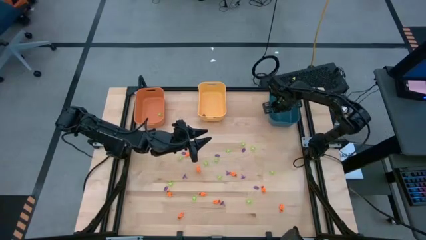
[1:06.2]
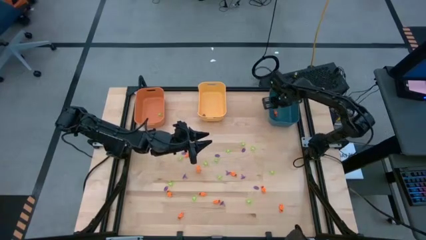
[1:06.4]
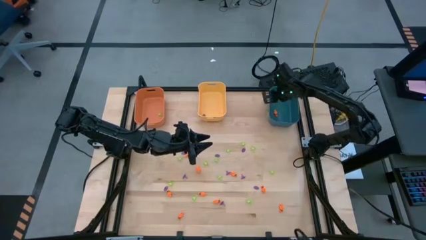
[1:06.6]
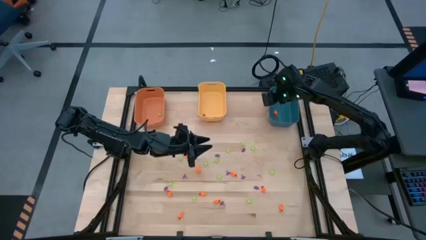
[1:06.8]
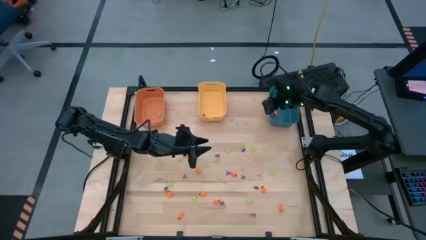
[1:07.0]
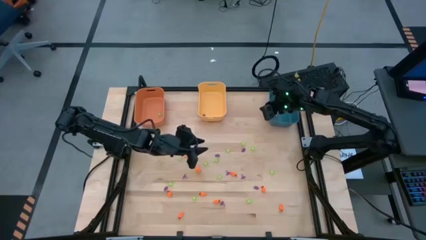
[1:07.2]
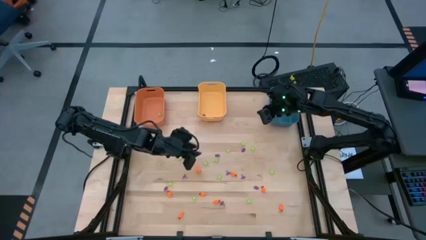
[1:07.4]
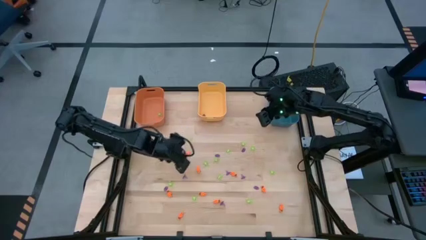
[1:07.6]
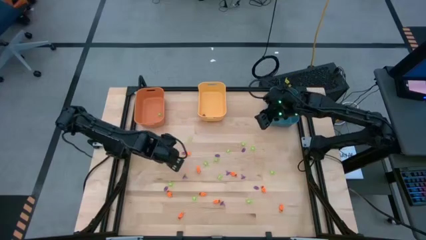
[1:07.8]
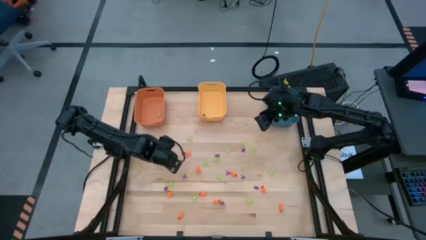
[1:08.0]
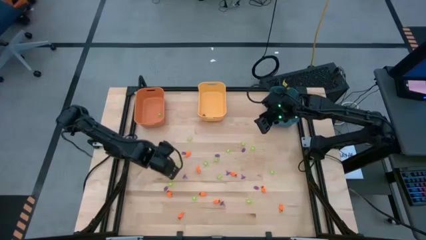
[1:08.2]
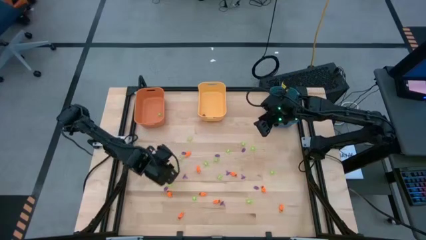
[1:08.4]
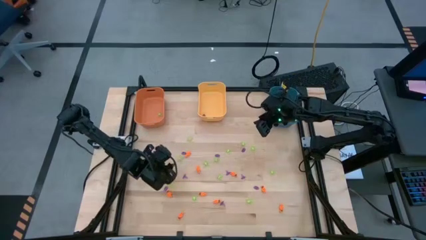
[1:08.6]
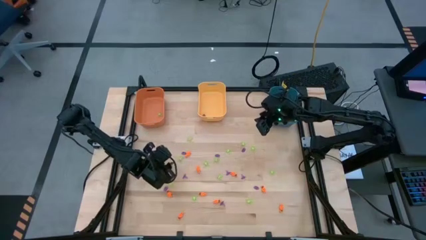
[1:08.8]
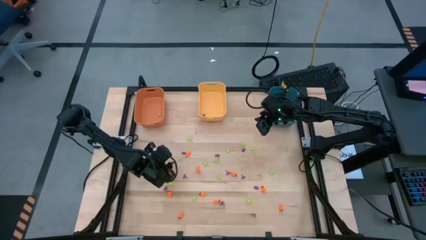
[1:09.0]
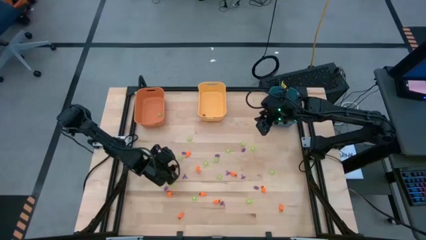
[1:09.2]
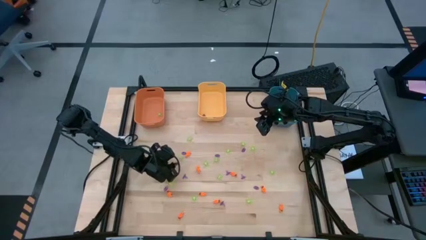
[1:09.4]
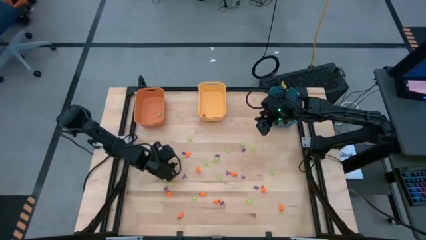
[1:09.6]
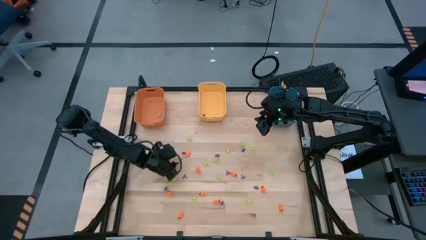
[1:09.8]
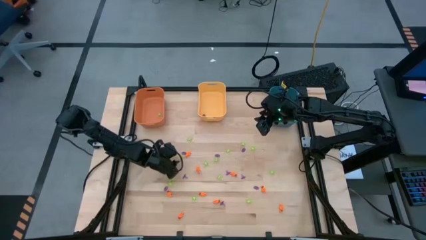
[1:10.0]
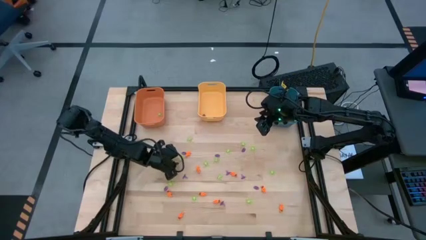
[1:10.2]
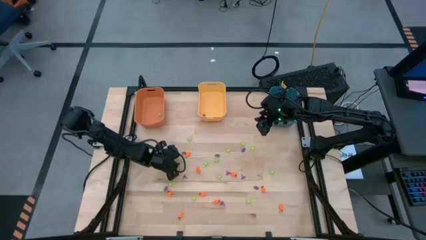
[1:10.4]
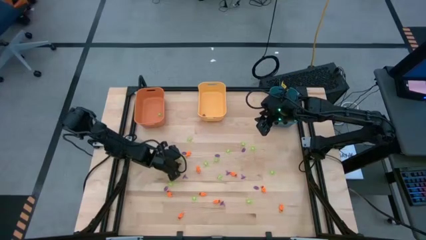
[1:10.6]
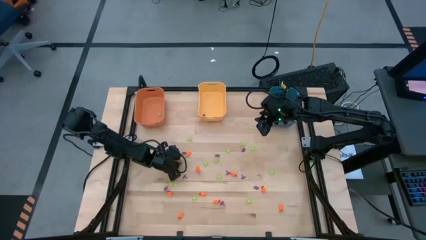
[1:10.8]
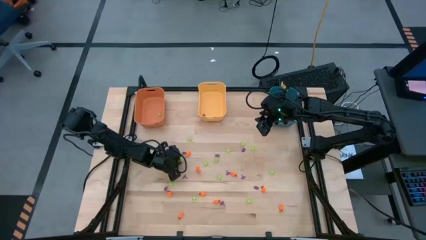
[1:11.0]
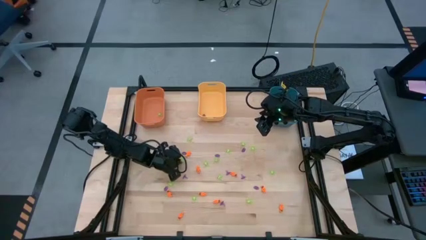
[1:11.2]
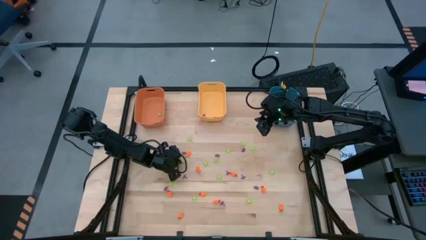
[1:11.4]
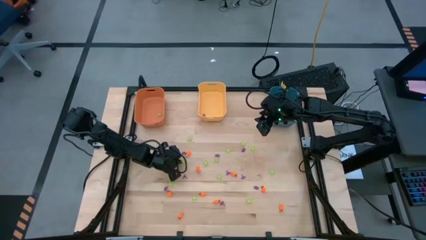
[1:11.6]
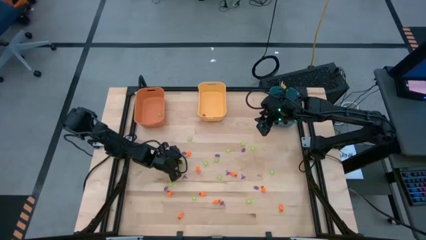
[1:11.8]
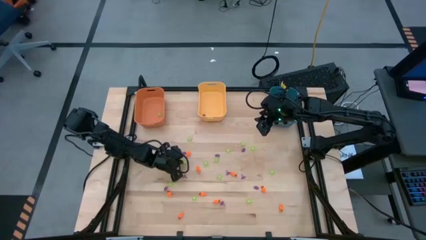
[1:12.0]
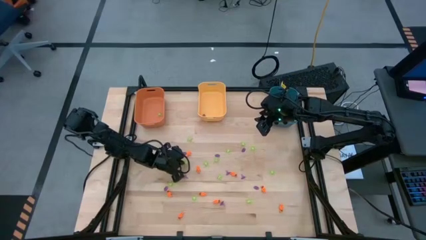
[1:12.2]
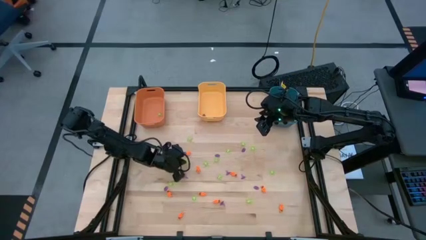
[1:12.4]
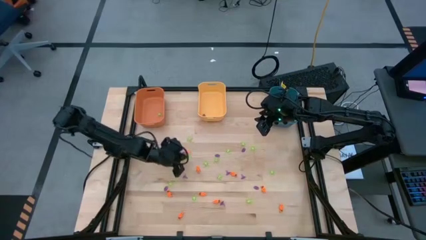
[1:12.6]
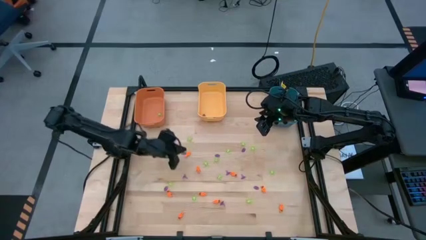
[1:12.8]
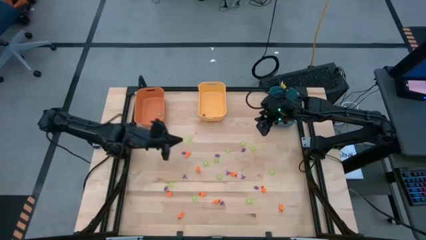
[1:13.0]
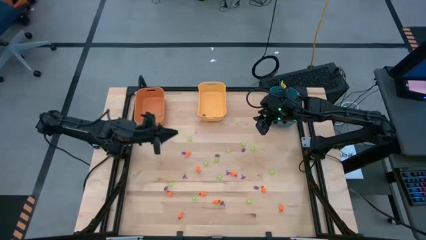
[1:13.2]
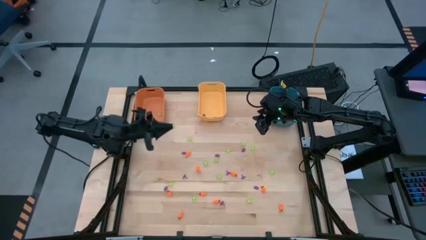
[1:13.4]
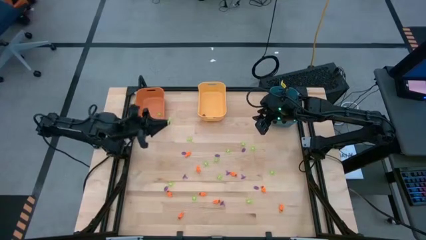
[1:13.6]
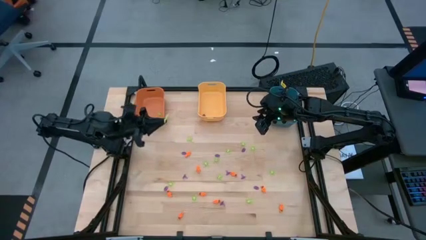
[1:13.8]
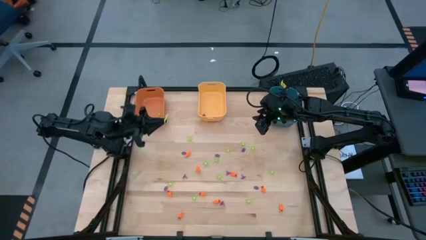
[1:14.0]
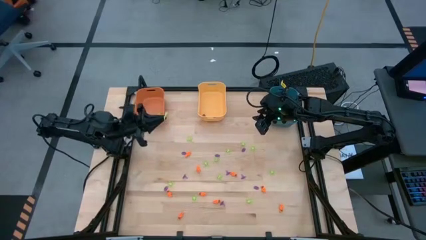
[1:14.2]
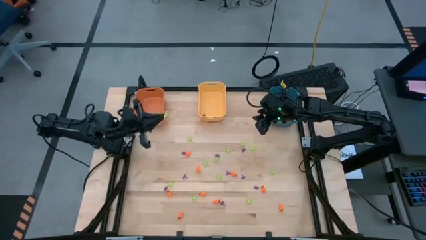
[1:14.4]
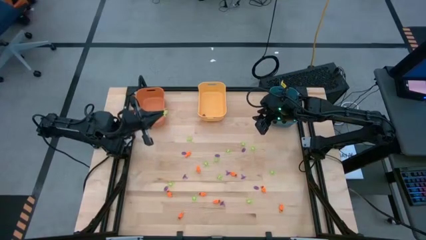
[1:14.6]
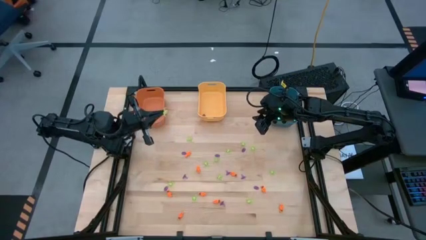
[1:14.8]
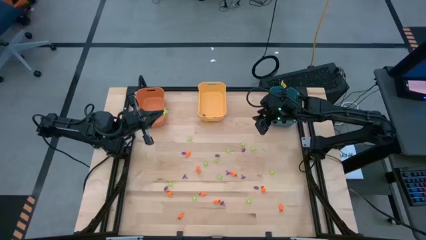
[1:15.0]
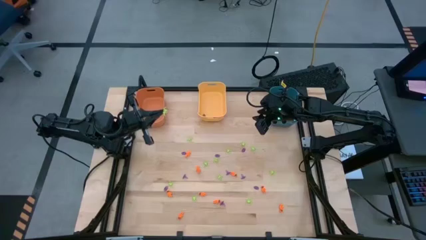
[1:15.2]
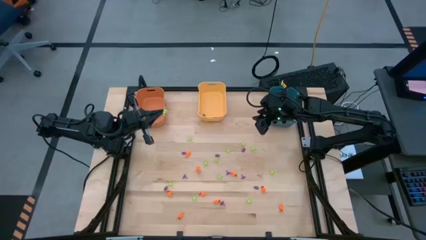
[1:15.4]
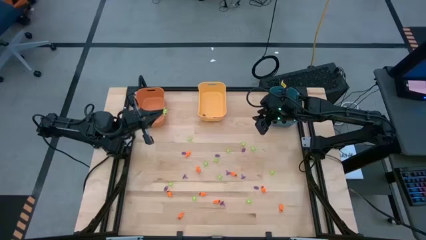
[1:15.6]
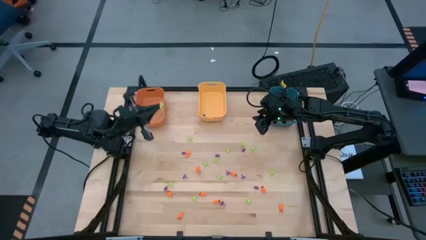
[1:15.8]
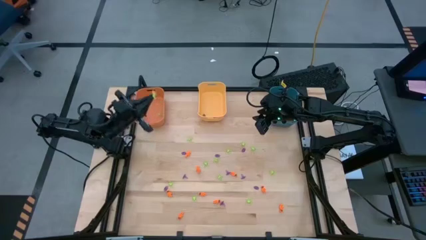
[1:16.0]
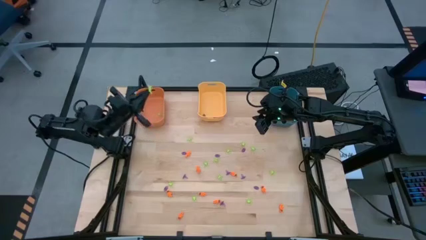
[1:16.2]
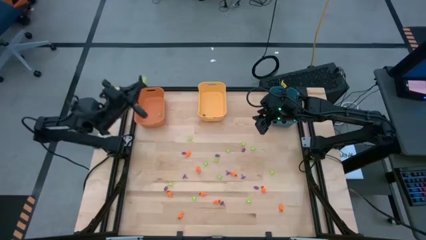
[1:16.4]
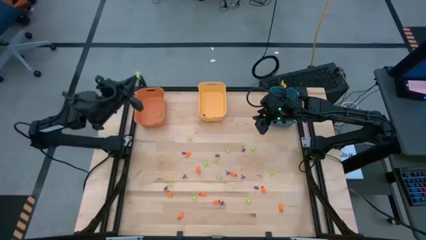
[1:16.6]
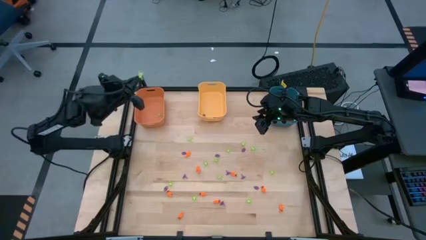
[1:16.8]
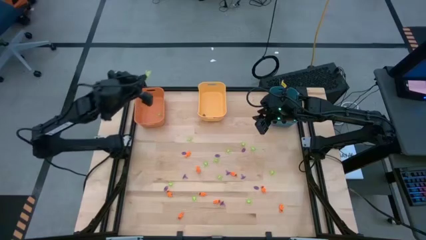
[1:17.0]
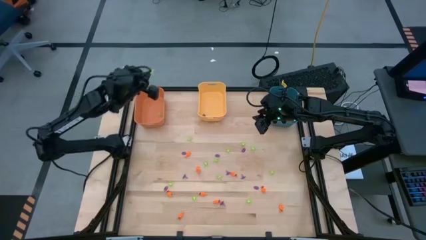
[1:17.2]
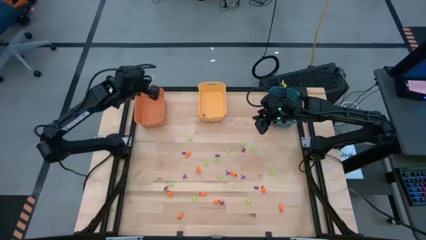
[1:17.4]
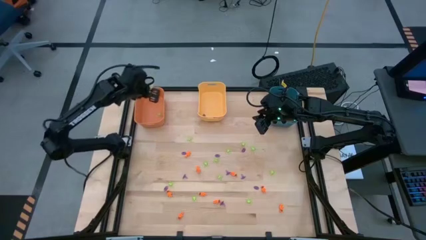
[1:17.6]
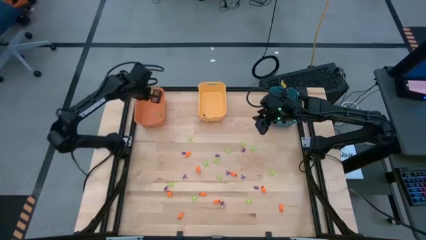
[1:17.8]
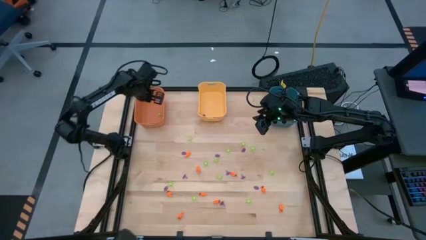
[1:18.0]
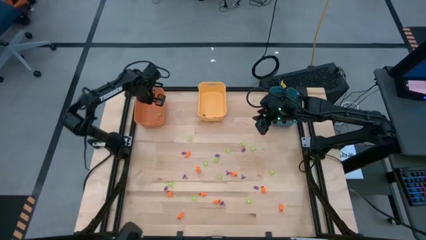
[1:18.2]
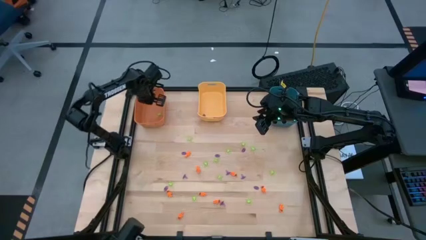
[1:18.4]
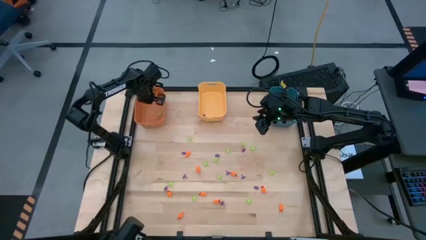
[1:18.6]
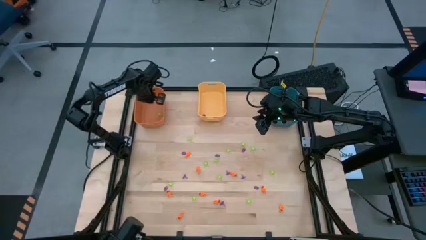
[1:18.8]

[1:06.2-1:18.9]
Task: Sort Halloween decoration
Put the green spider toy into the orange bin

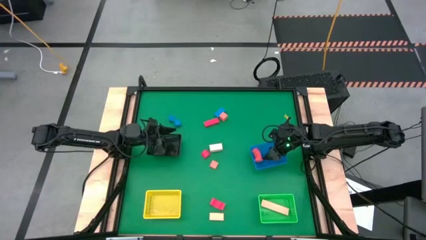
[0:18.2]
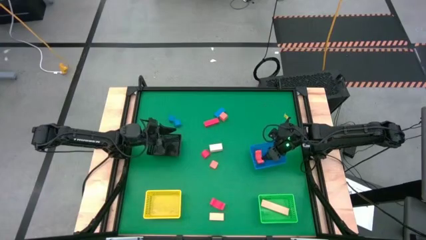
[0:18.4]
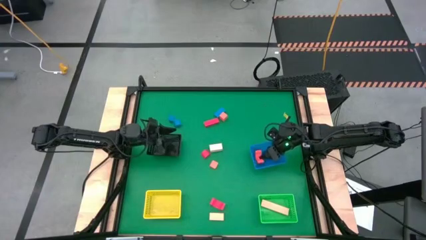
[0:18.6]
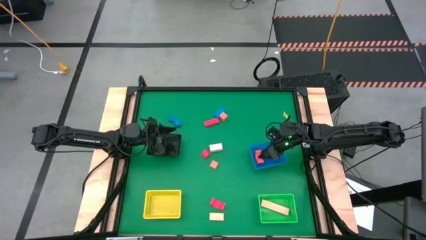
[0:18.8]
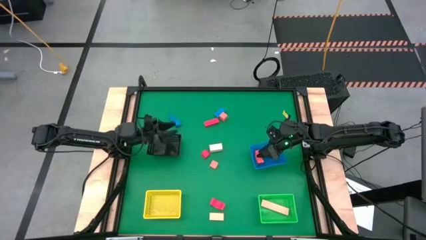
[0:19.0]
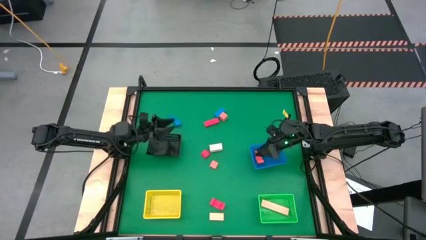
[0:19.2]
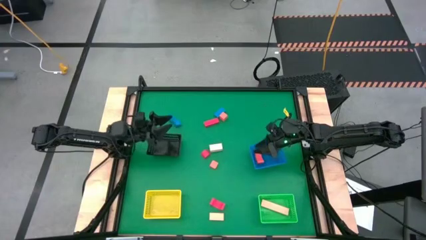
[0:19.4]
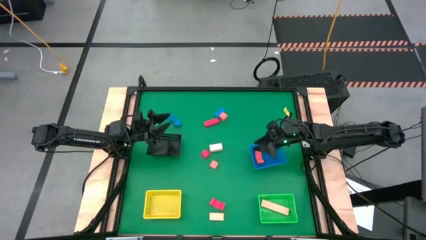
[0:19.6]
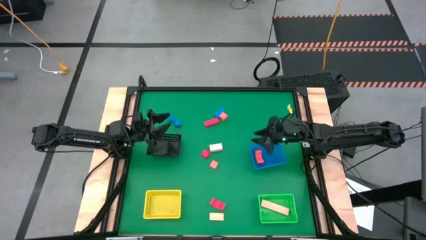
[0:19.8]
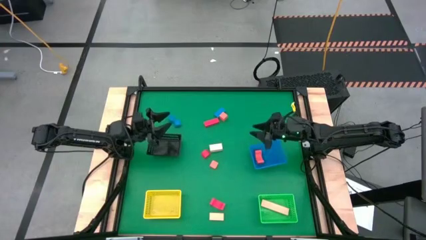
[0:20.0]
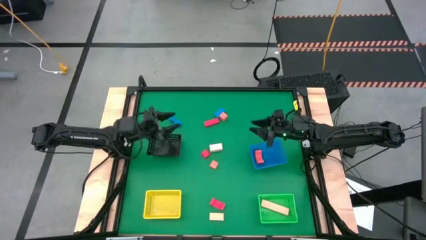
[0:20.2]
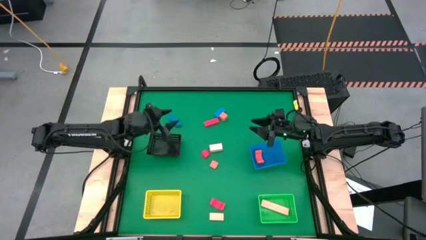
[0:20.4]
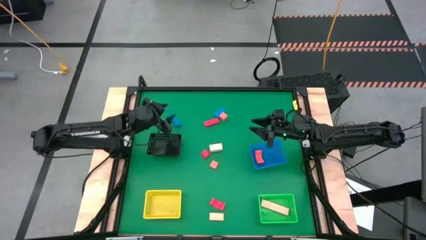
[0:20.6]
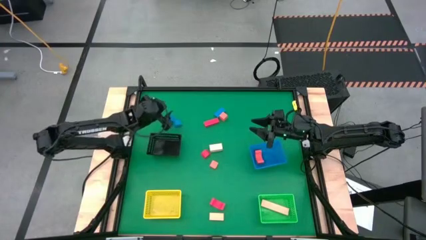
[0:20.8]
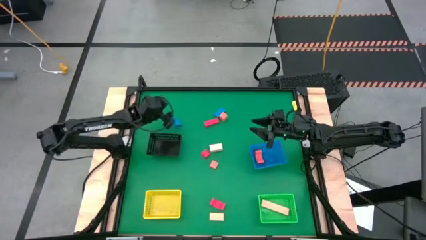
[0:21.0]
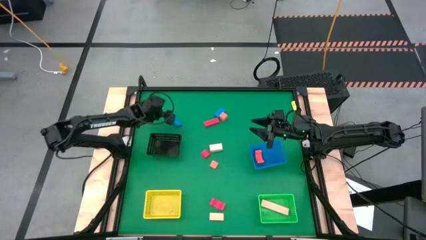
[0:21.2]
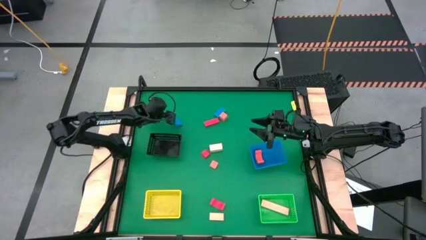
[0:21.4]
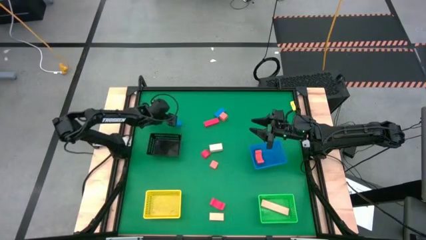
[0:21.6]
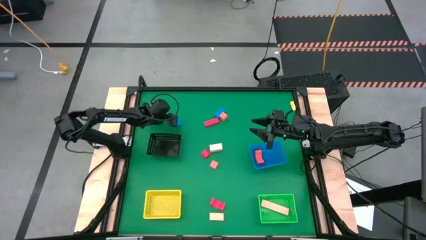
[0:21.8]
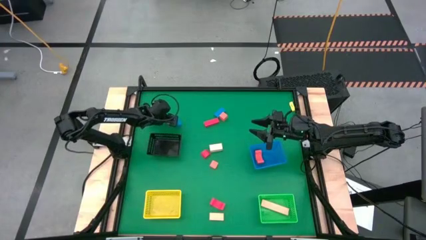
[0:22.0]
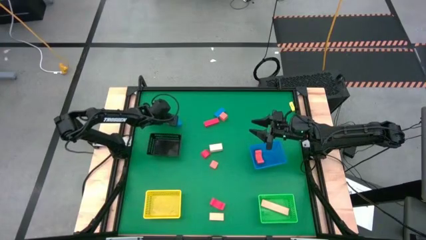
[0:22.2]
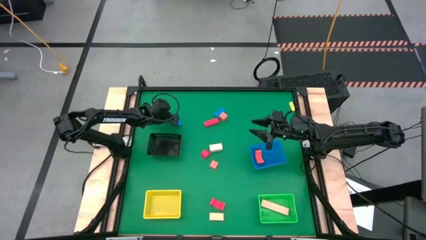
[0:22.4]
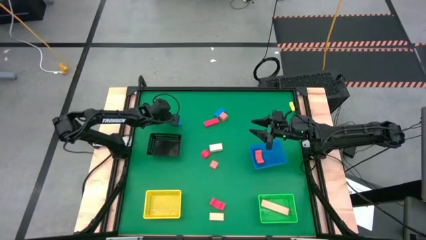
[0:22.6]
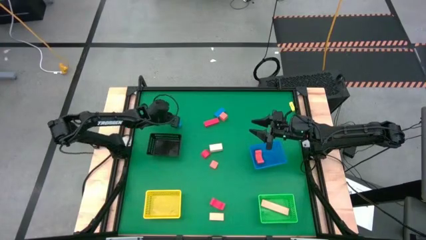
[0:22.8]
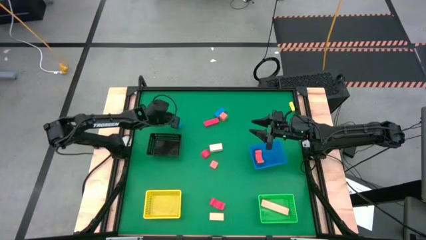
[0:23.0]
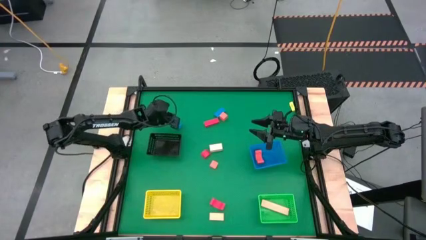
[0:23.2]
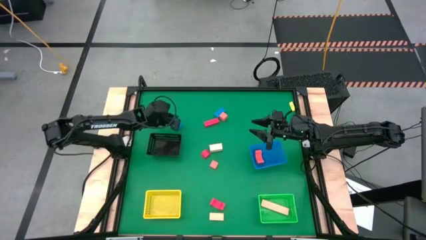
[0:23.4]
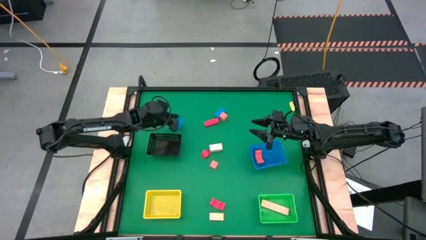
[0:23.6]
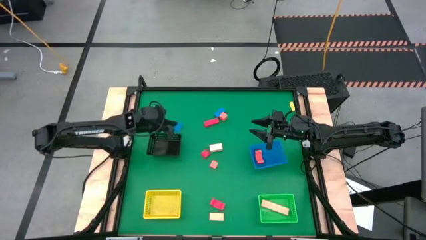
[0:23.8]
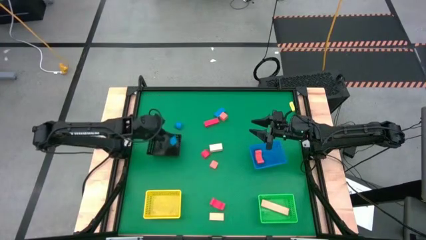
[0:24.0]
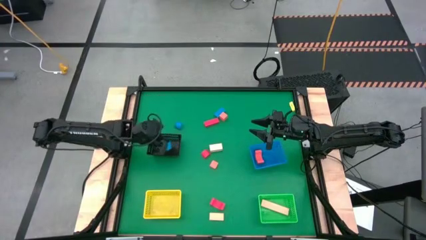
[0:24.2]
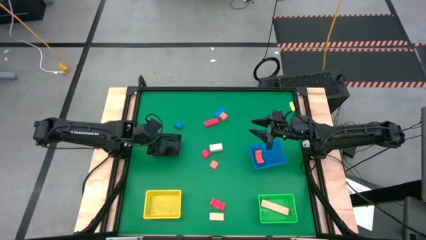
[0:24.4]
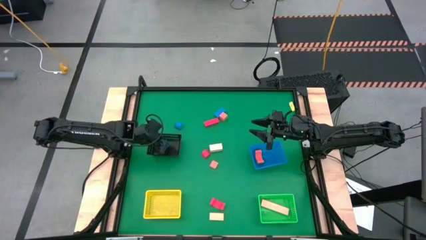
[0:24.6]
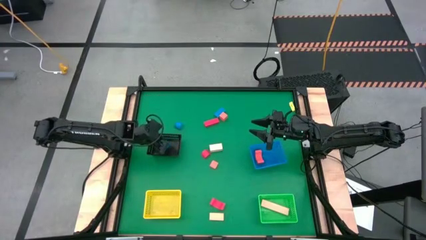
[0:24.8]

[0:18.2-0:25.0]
Task: Sort & place blocks by color
Put the left blue block into the black bin
